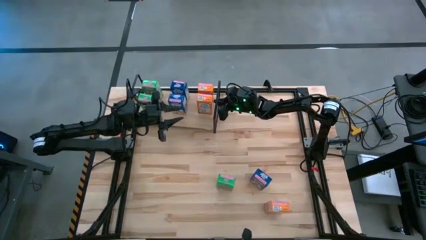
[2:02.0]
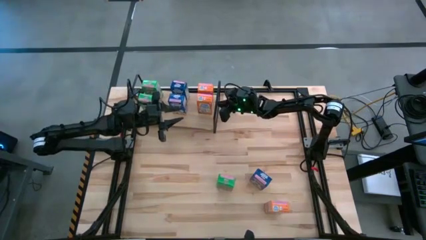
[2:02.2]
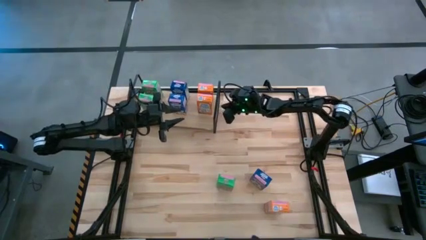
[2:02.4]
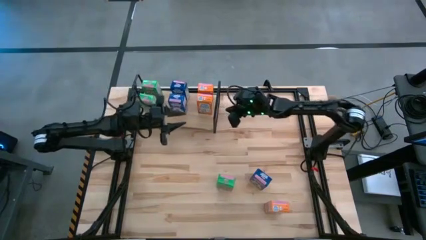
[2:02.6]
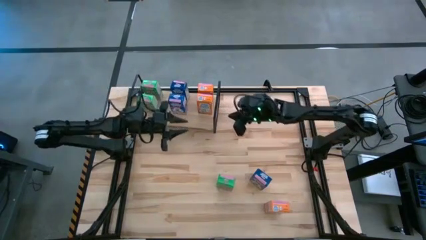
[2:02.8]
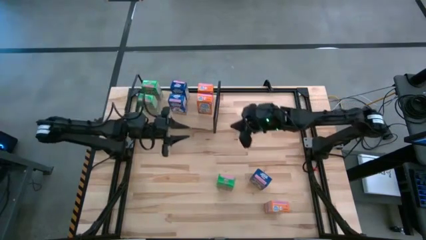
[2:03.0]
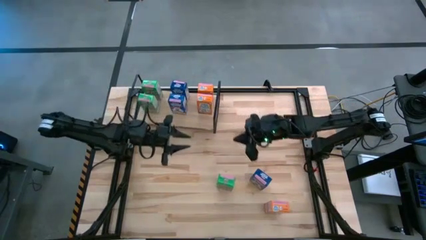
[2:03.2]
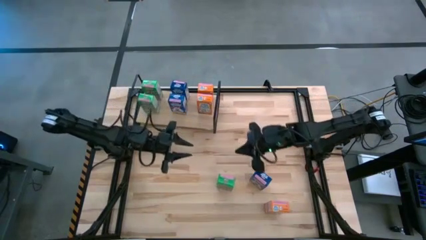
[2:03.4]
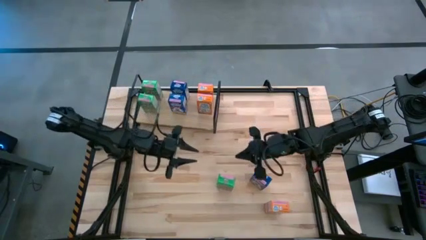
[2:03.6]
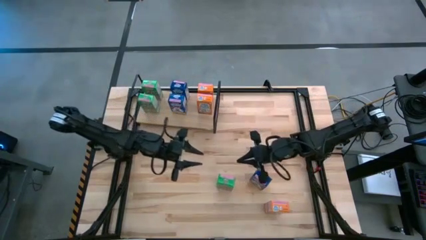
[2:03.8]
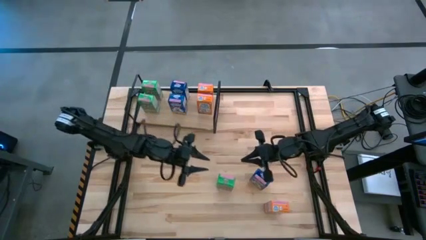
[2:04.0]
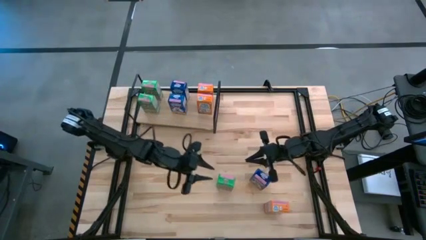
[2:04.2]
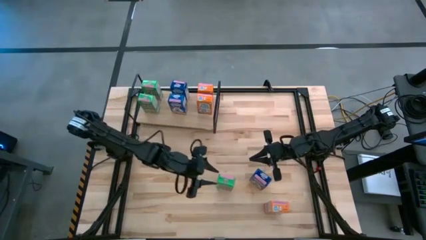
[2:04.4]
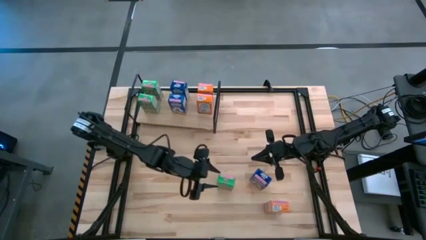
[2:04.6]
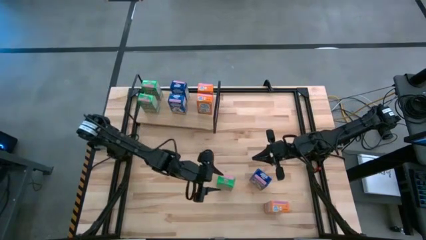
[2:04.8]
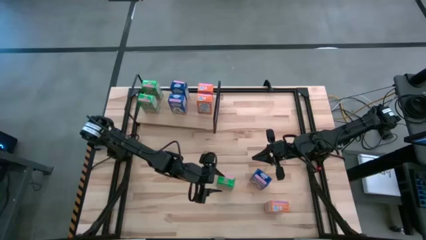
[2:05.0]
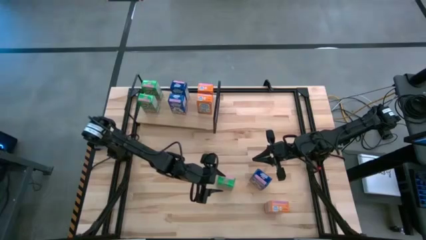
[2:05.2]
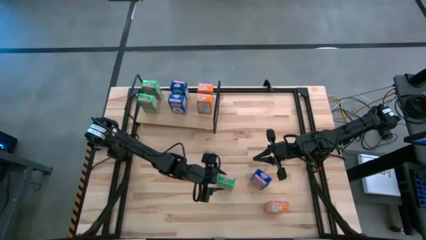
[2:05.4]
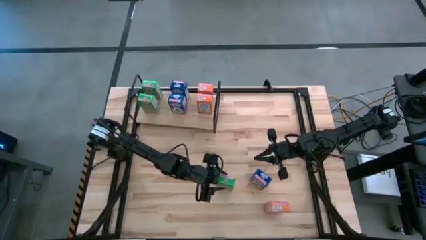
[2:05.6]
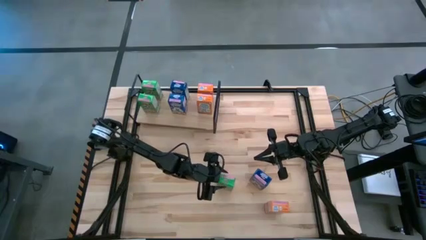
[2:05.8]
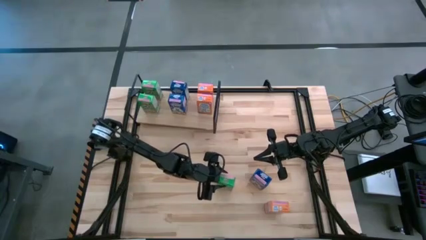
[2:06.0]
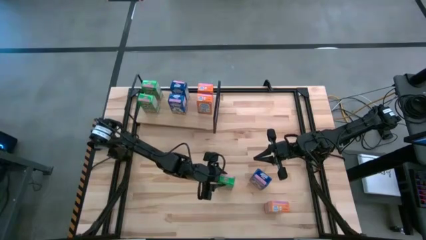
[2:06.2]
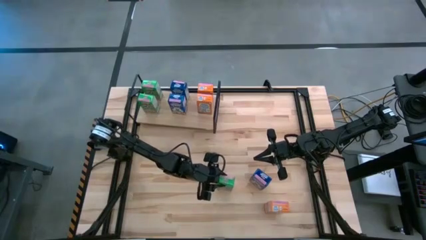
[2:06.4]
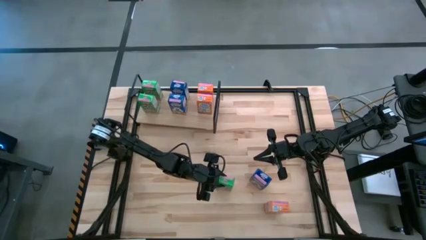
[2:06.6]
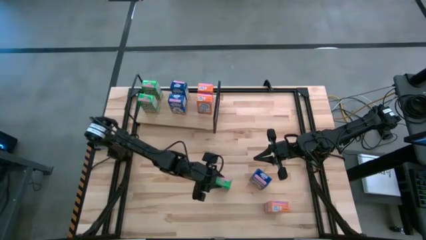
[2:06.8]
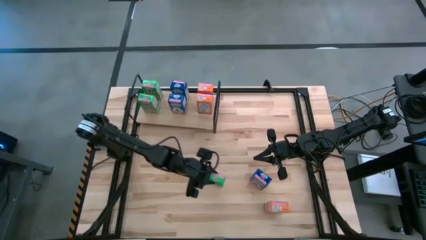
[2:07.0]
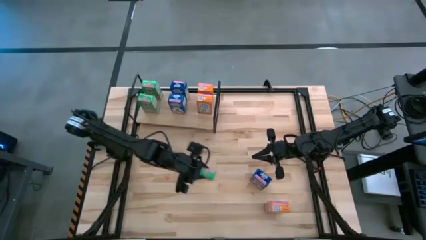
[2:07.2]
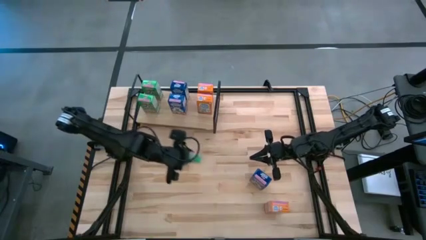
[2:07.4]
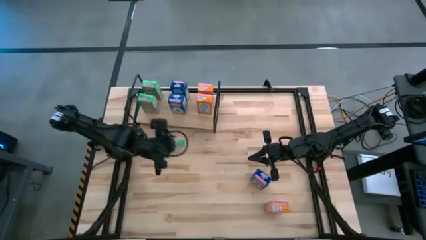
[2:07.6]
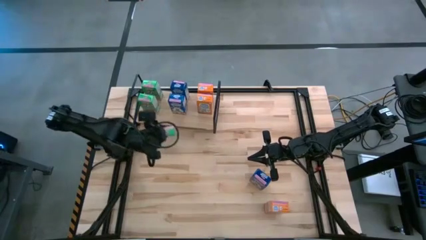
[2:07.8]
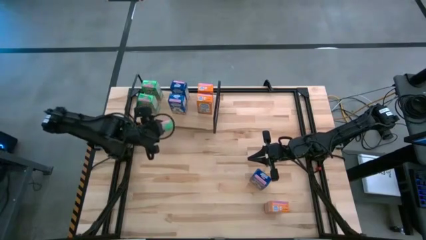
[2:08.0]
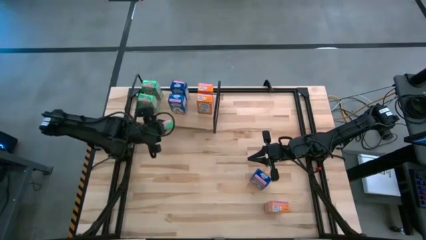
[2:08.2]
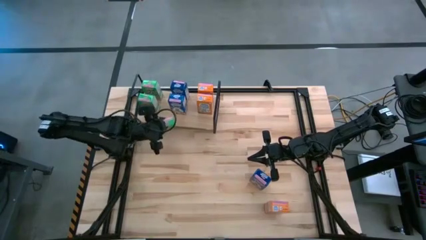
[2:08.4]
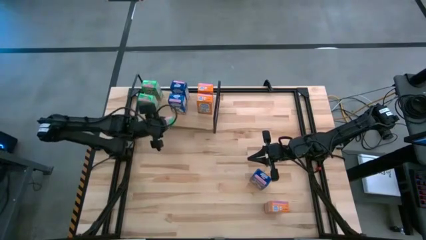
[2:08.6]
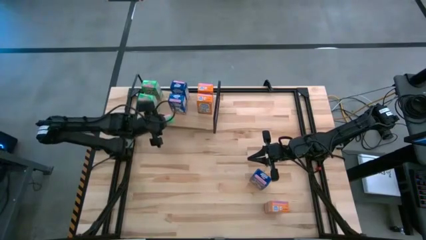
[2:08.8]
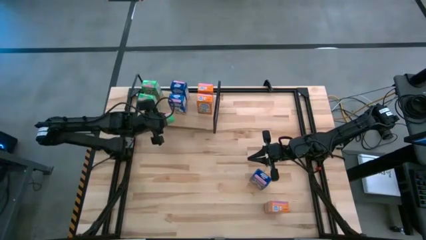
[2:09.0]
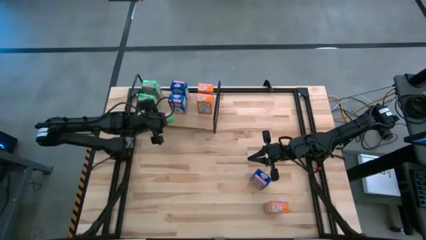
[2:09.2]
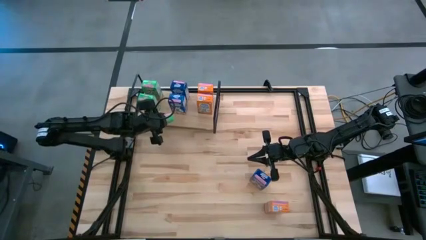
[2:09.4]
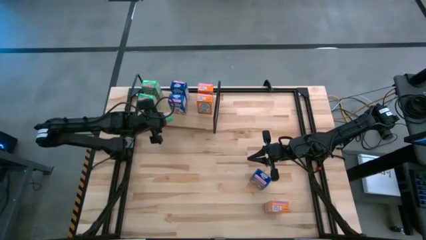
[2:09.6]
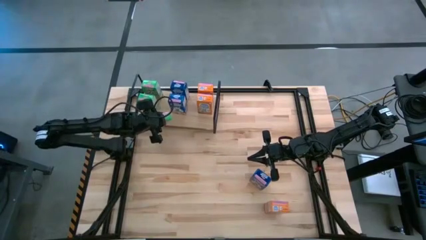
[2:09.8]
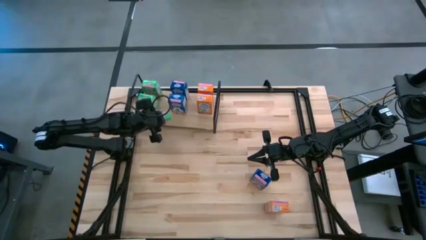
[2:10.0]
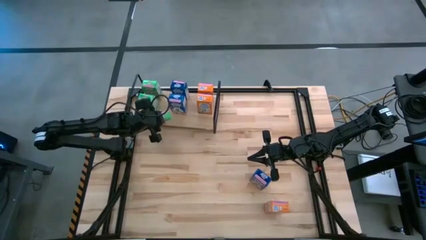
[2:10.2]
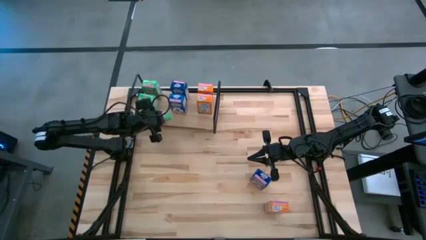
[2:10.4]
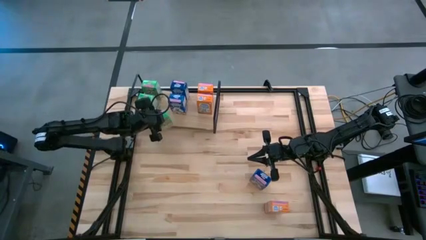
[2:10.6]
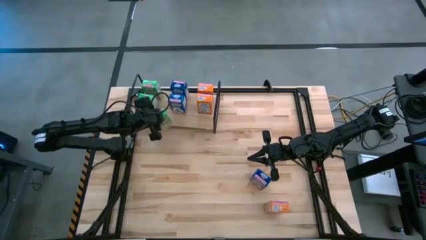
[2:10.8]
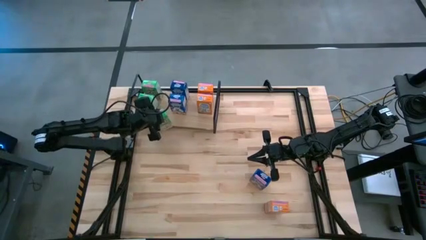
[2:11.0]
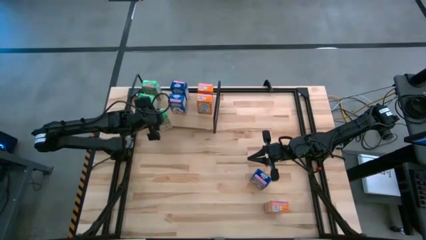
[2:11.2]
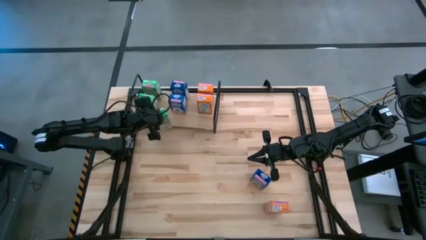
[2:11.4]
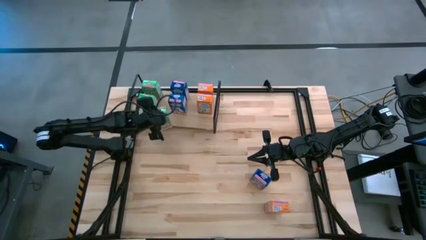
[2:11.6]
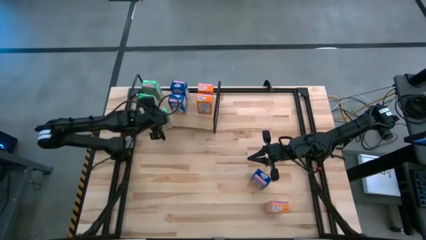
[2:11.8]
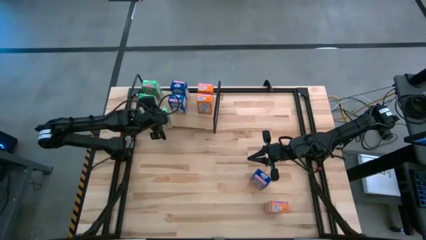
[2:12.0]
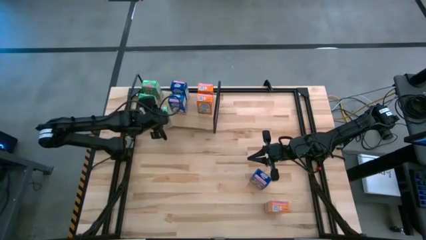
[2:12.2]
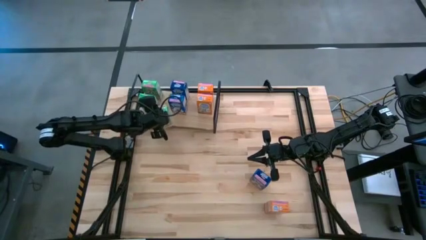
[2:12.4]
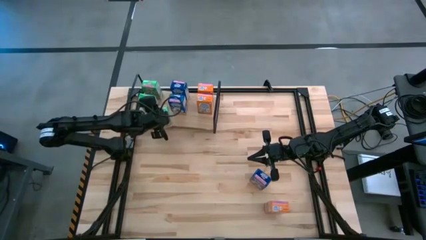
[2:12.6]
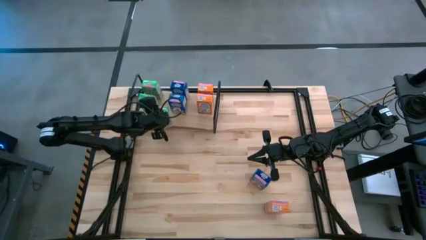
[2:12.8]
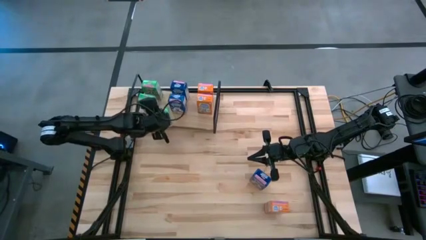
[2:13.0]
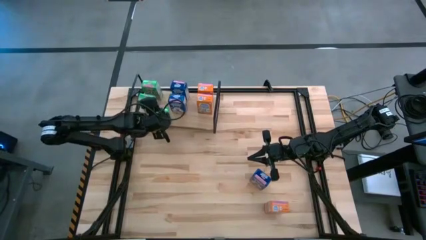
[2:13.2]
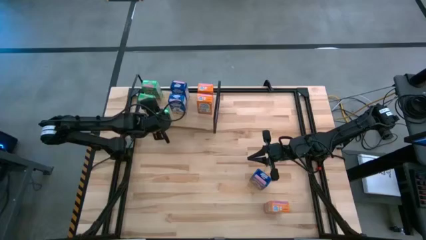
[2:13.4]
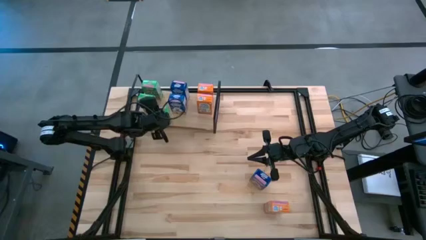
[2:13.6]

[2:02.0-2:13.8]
Task: Stack cereal on shelf
Put the green cereal box on the shelf aligned with the green cereal boxes
